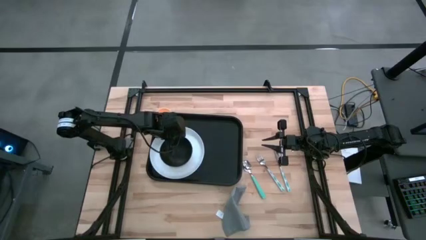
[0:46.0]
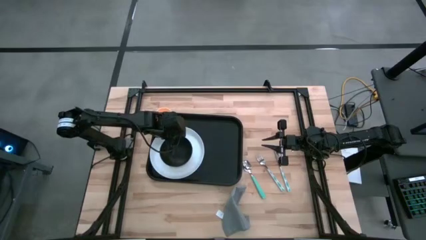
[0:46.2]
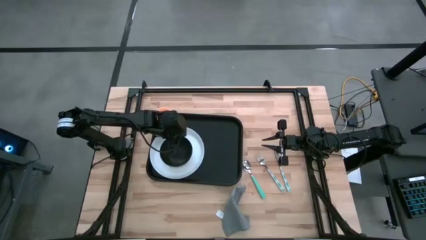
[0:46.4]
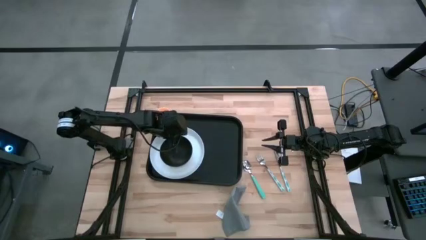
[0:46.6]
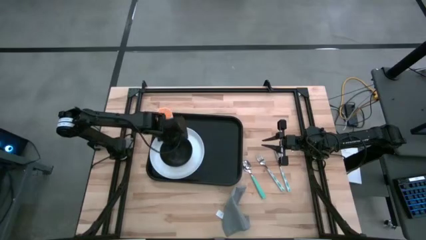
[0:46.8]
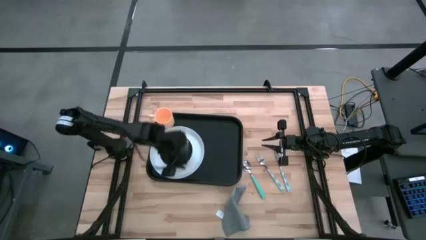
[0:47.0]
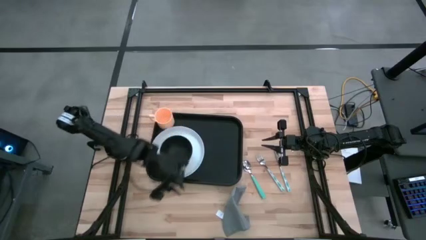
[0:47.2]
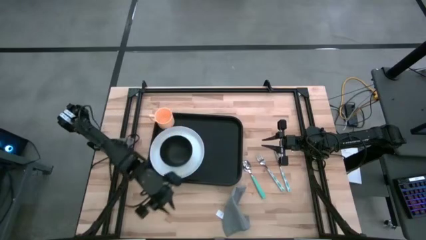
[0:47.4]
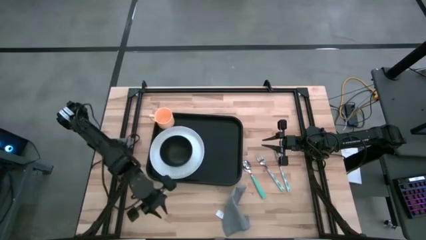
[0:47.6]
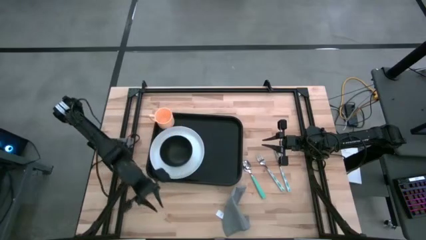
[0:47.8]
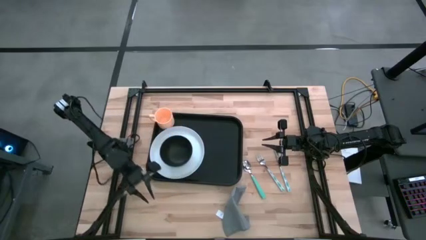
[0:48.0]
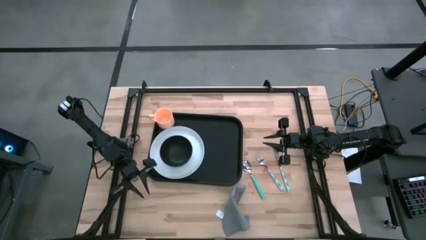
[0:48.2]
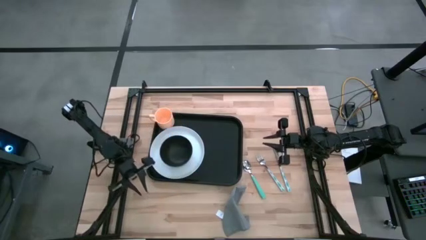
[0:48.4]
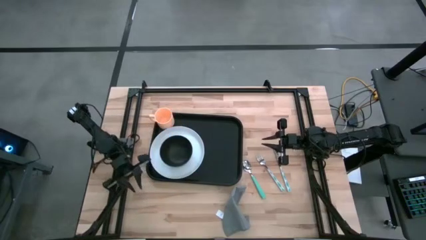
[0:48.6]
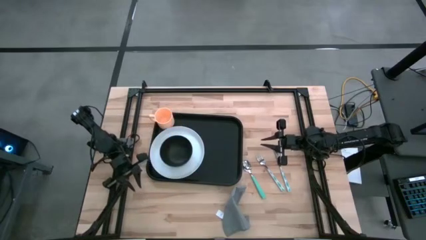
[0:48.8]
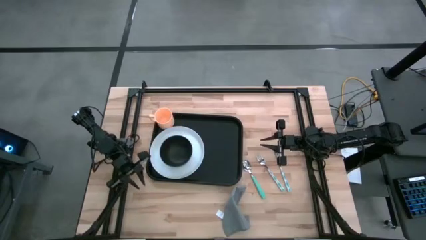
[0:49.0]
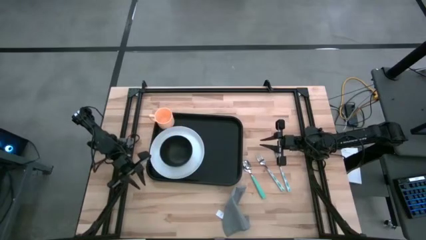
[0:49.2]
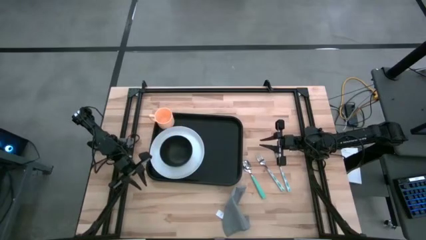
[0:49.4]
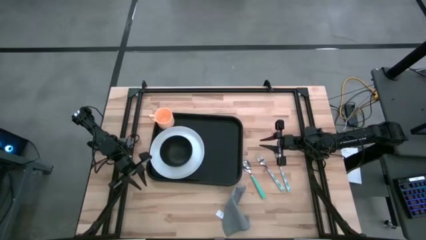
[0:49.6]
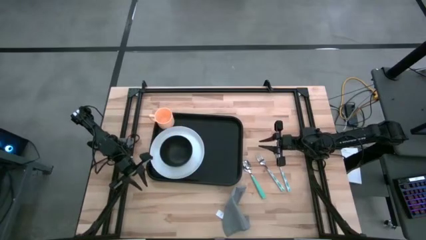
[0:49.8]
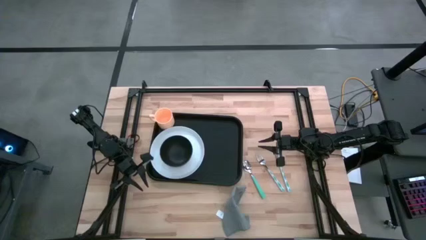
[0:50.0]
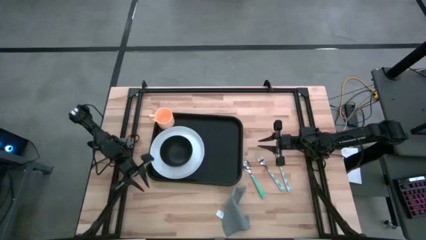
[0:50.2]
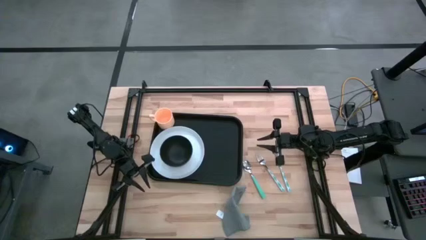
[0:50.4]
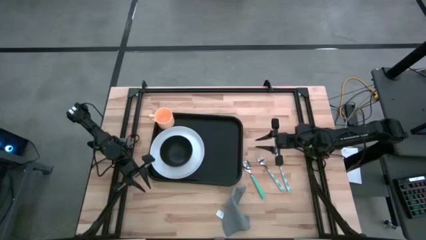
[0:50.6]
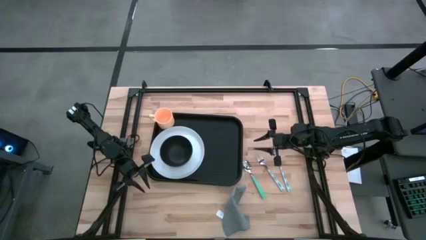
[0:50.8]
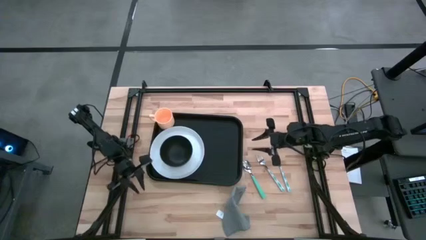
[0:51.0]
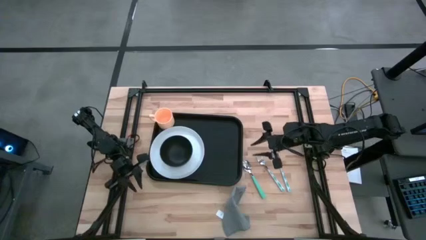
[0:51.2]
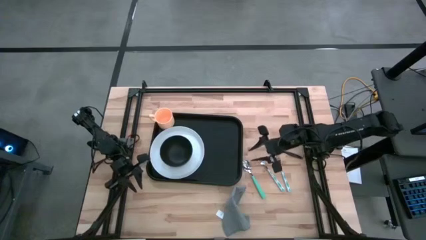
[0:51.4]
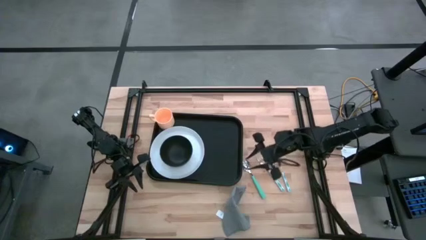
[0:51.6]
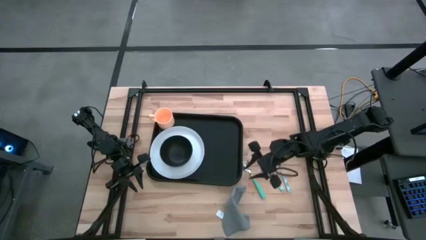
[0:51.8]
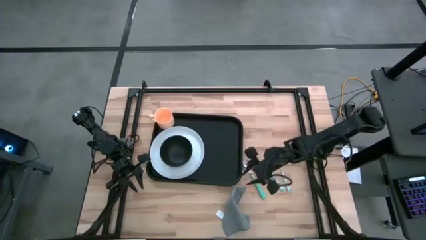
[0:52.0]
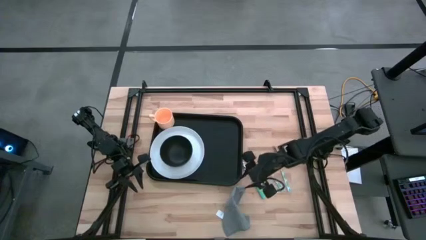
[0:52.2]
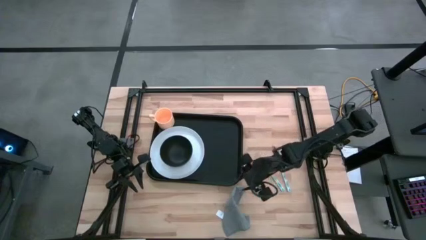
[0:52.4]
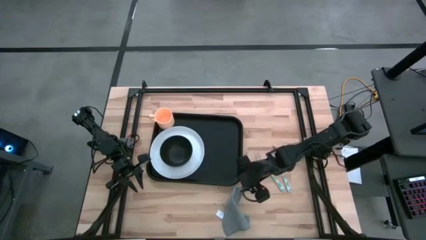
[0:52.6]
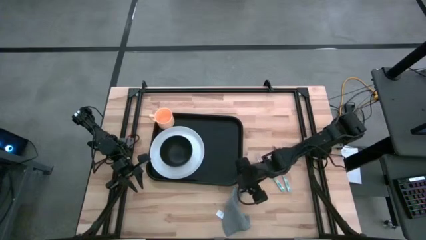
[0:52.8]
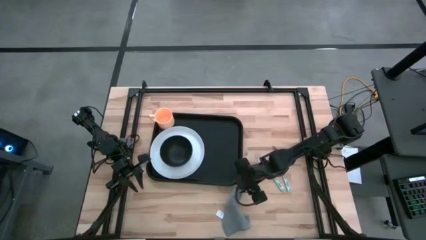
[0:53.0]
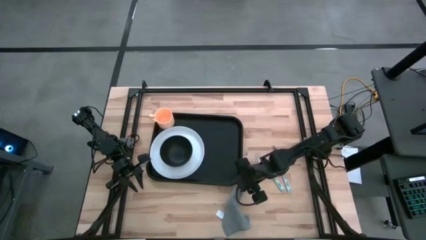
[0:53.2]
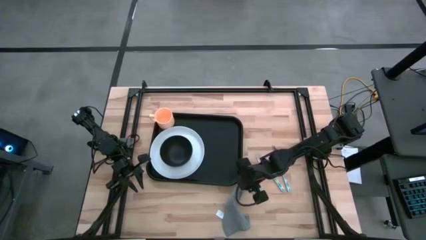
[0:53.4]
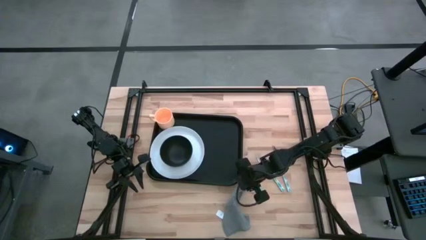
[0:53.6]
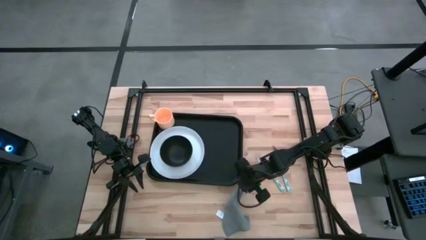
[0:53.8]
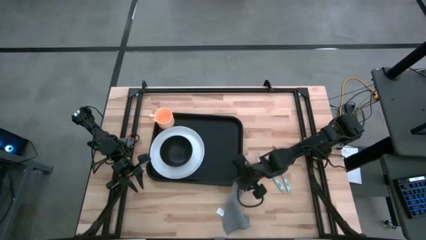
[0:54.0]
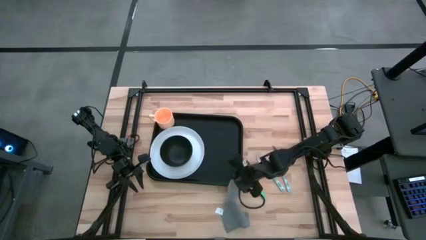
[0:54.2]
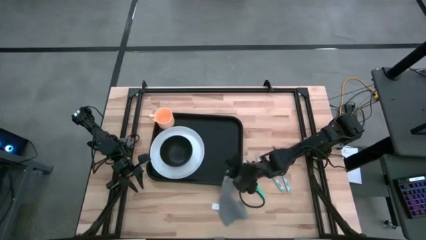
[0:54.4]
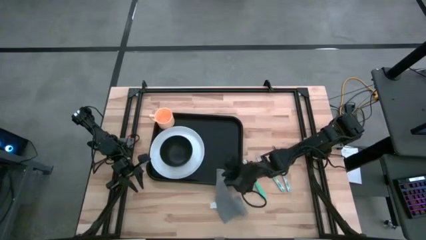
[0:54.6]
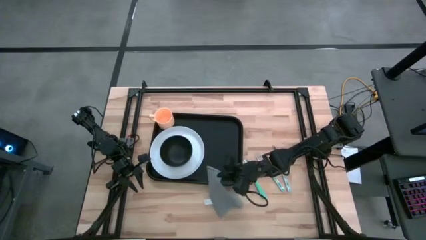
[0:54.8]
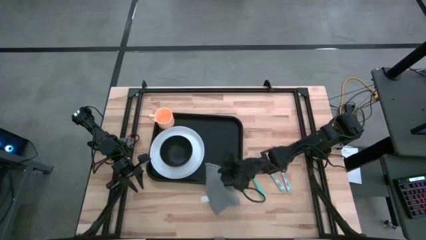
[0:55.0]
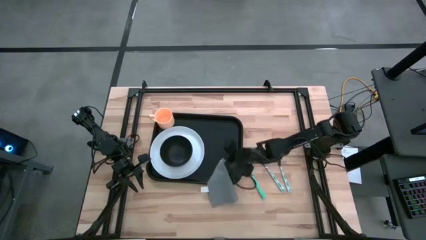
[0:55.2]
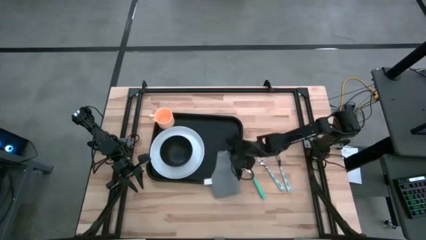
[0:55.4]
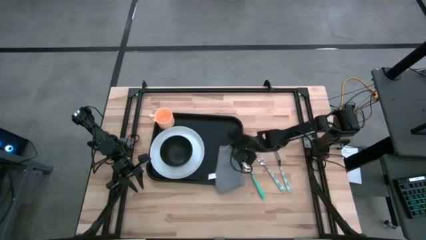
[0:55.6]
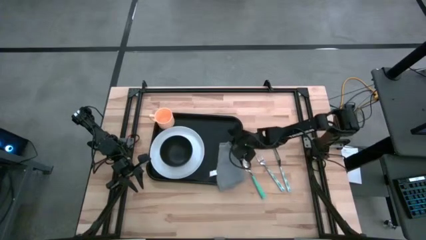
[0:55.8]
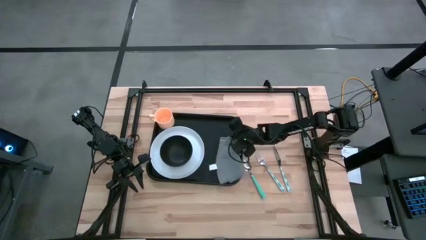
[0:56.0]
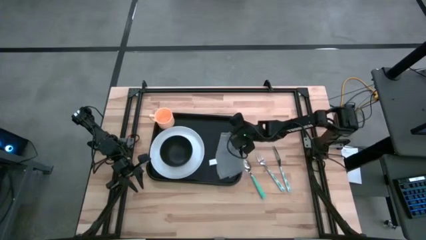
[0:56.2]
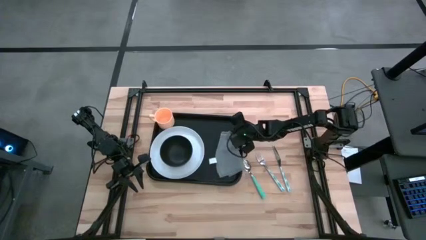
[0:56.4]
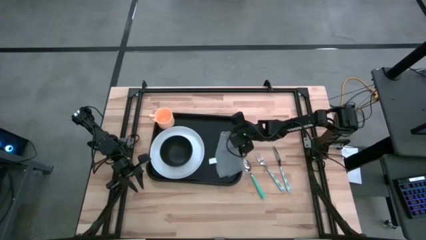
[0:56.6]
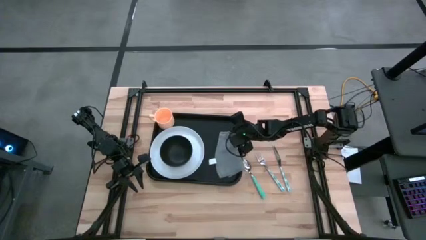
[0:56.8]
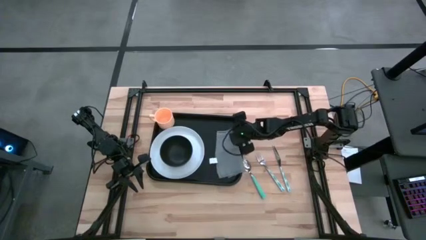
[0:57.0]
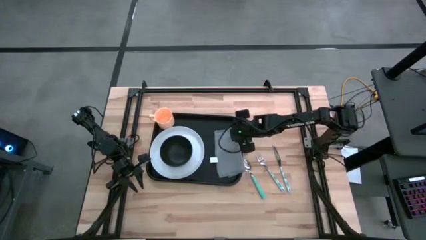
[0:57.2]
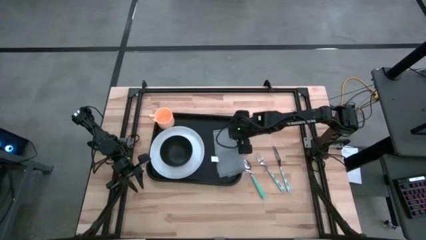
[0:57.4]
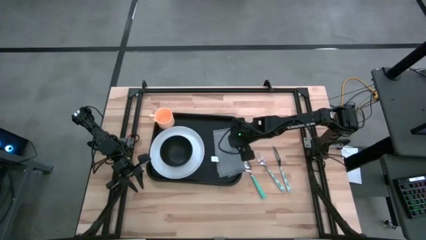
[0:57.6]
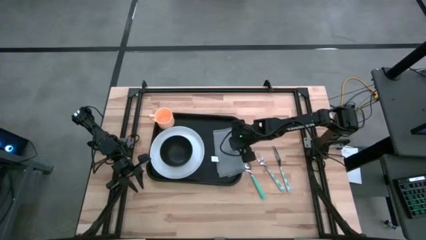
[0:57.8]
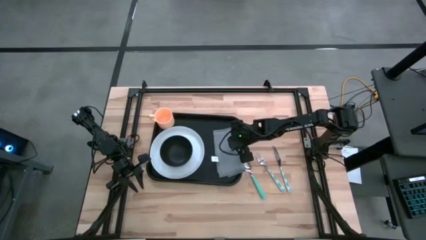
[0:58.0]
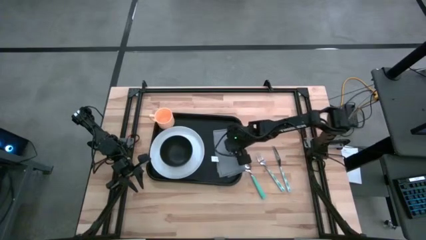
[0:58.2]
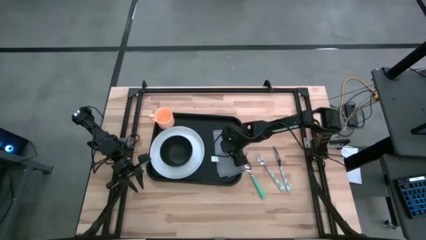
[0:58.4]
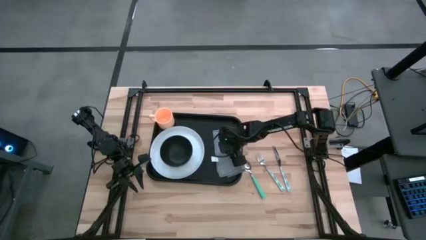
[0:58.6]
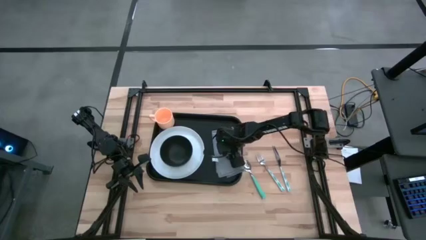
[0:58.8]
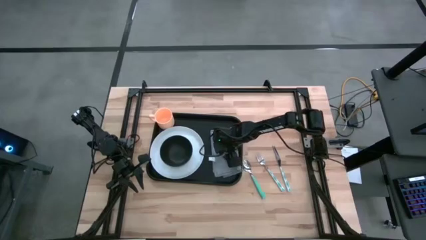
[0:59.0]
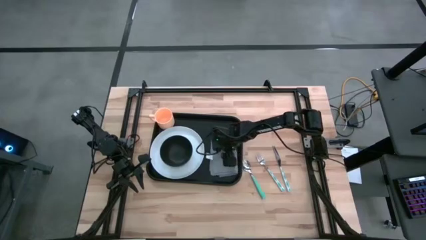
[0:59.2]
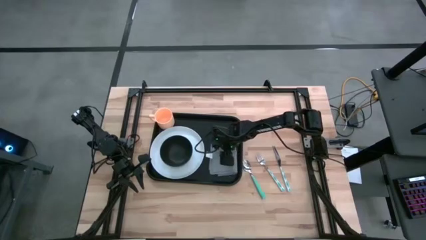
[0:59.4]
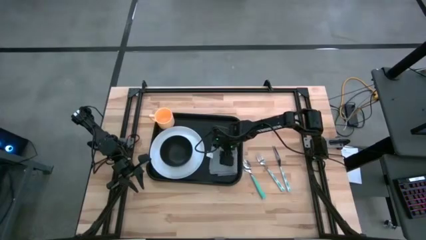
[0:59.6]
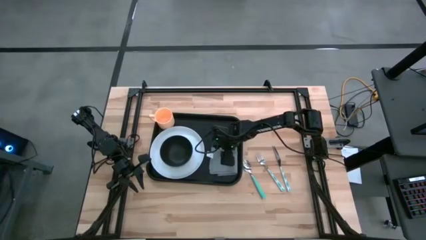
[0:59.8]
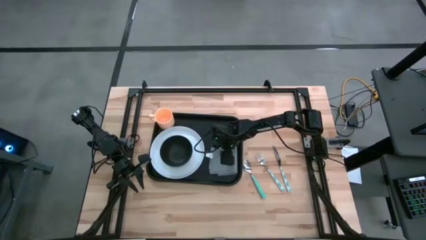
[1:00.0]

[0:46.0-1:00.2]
Task: Set up tray
Put the gray napkin on the black serving tray to the right of the white plate
